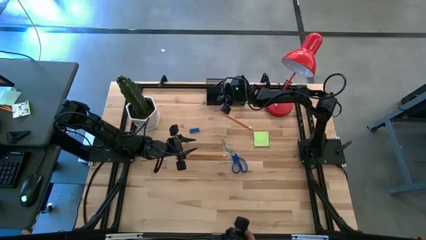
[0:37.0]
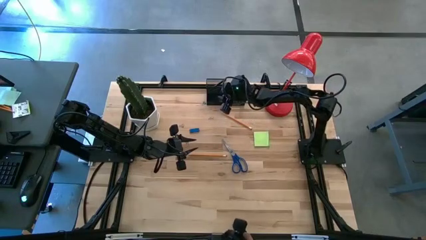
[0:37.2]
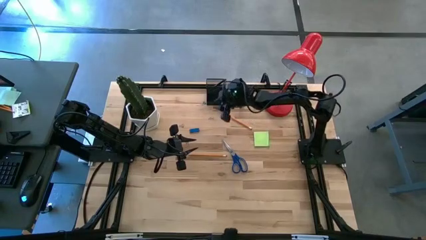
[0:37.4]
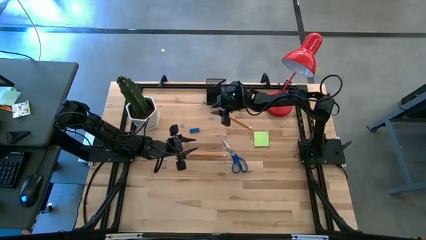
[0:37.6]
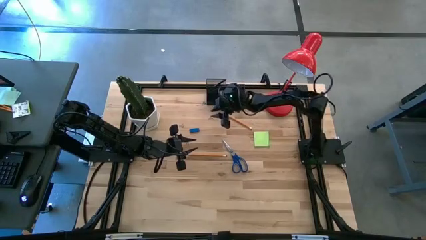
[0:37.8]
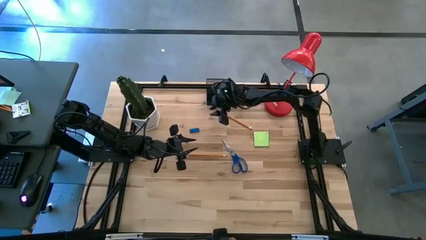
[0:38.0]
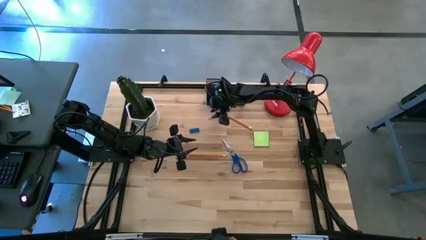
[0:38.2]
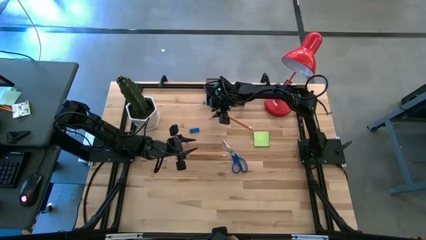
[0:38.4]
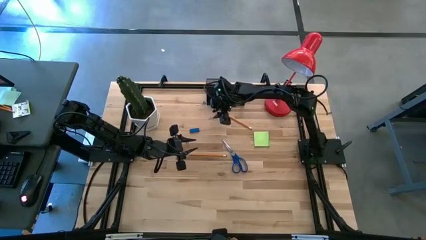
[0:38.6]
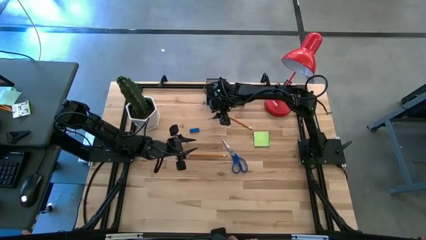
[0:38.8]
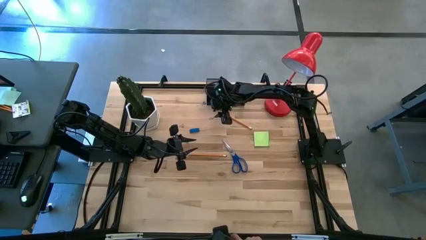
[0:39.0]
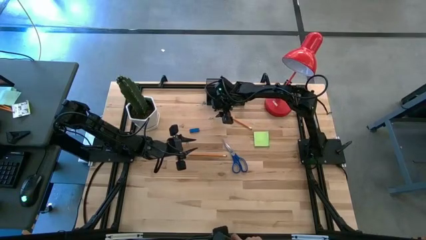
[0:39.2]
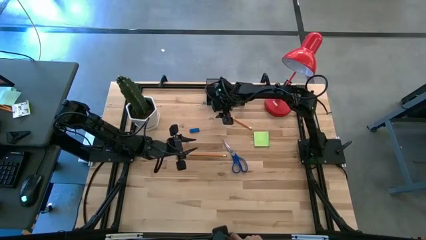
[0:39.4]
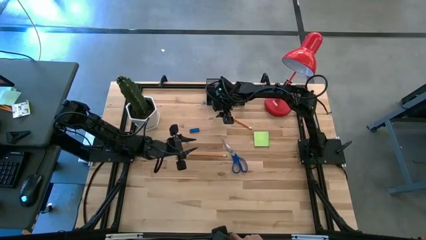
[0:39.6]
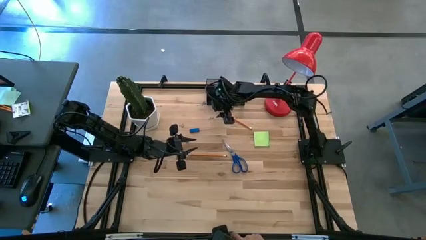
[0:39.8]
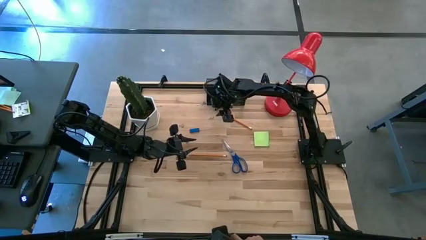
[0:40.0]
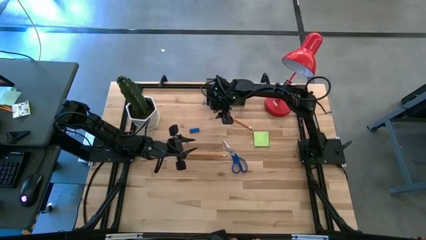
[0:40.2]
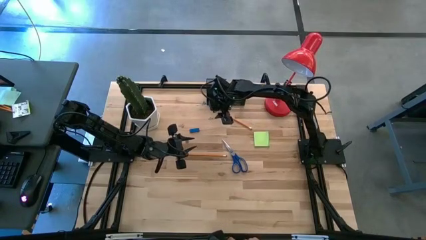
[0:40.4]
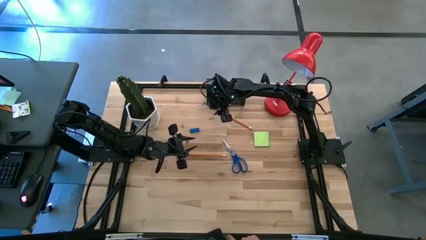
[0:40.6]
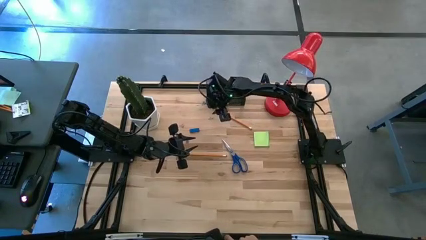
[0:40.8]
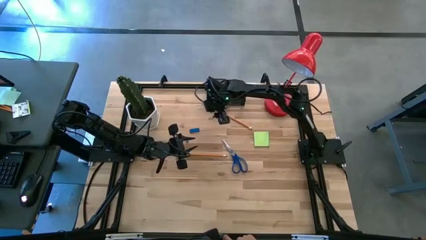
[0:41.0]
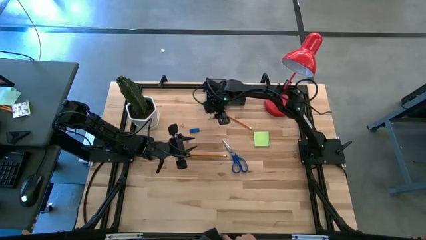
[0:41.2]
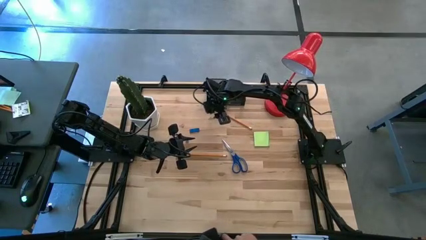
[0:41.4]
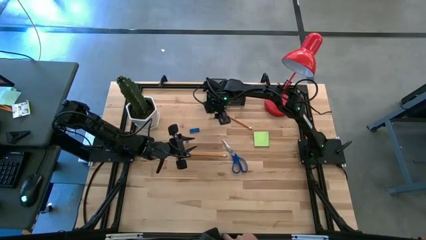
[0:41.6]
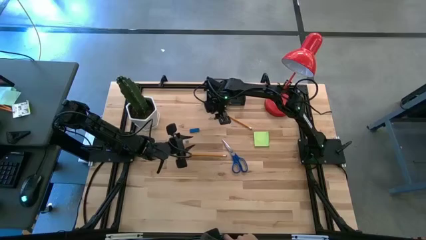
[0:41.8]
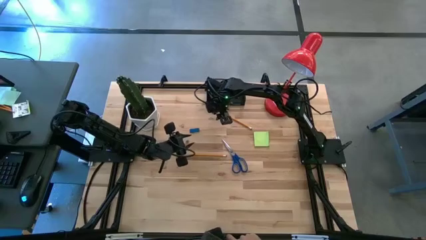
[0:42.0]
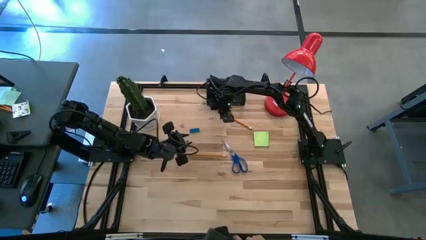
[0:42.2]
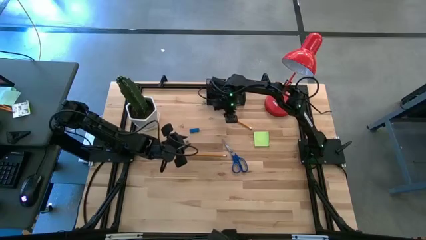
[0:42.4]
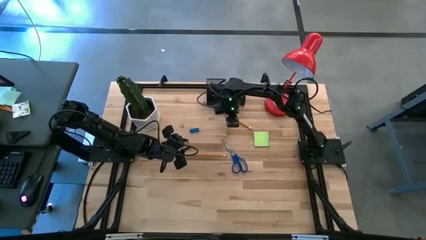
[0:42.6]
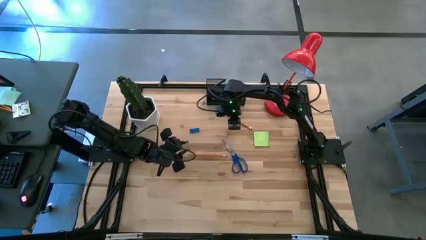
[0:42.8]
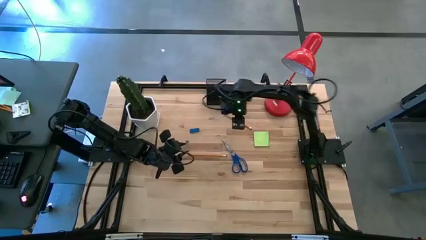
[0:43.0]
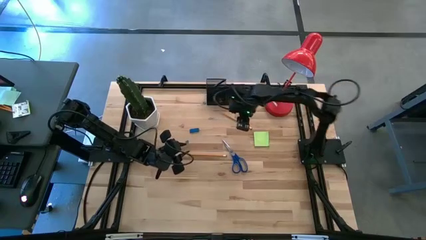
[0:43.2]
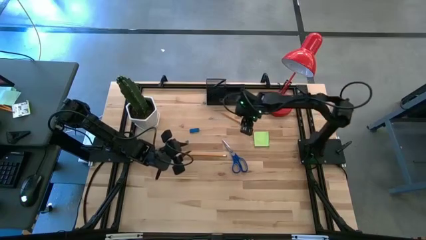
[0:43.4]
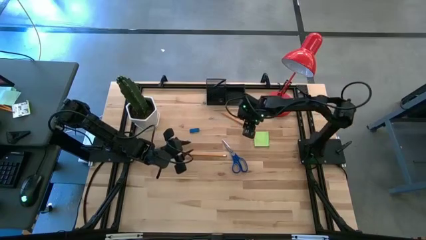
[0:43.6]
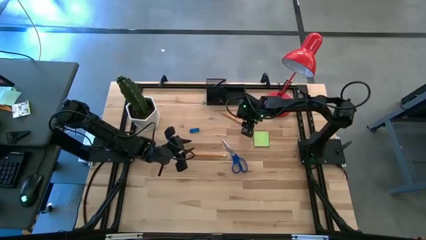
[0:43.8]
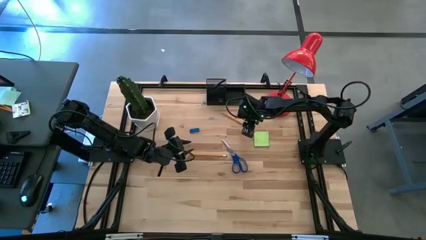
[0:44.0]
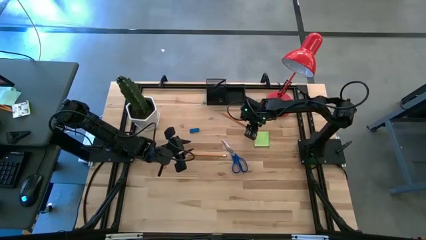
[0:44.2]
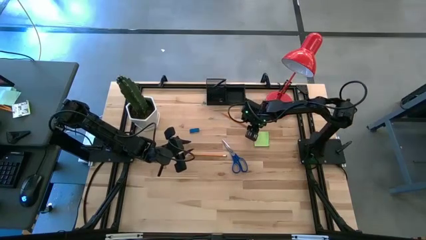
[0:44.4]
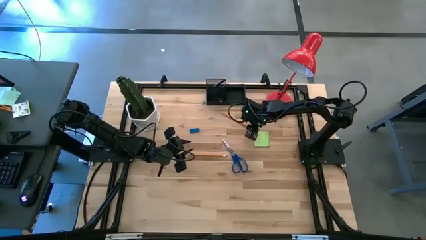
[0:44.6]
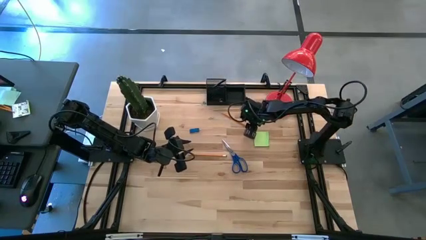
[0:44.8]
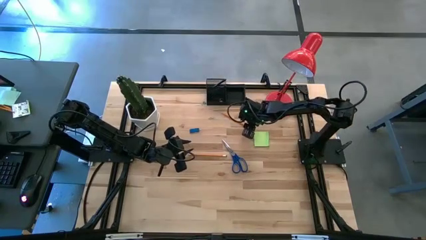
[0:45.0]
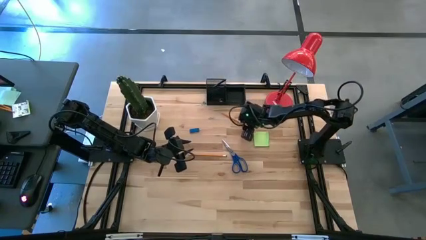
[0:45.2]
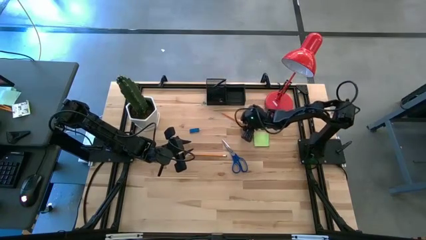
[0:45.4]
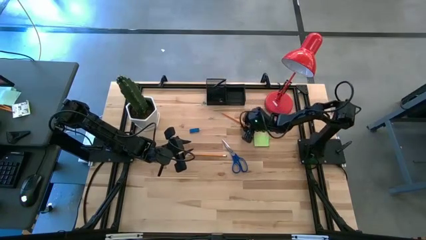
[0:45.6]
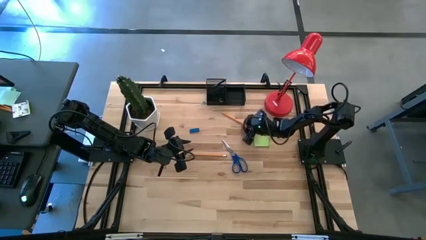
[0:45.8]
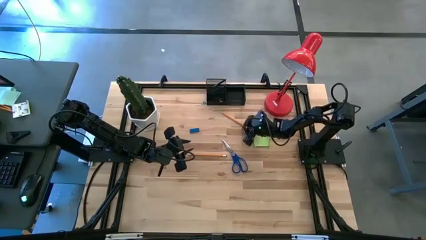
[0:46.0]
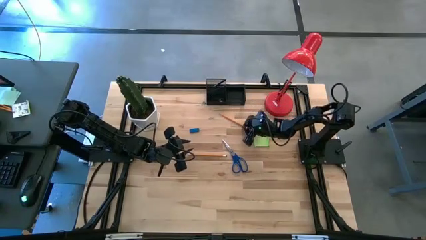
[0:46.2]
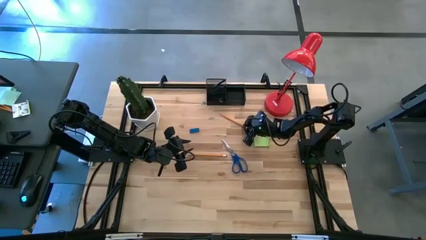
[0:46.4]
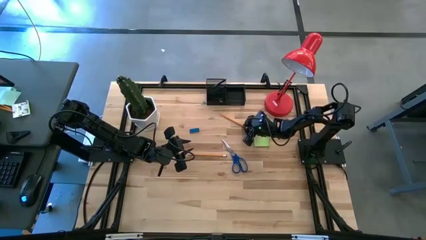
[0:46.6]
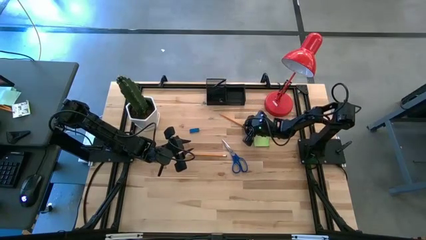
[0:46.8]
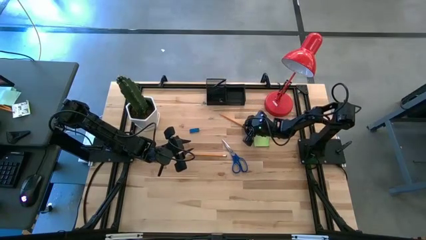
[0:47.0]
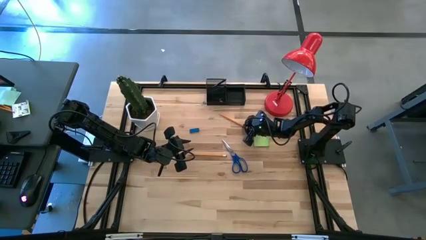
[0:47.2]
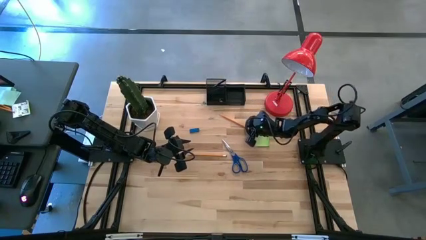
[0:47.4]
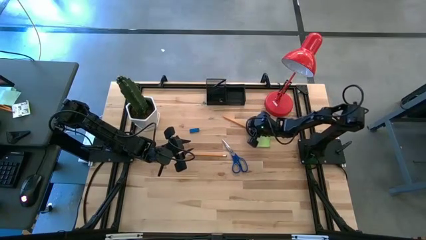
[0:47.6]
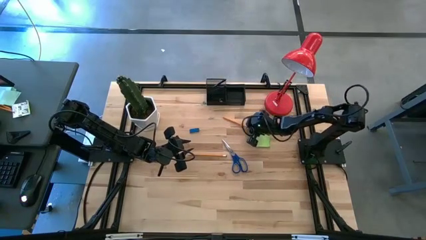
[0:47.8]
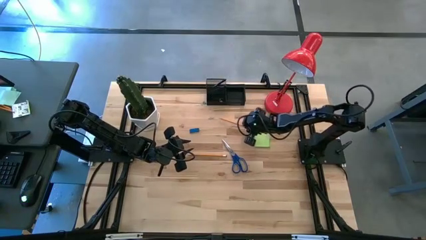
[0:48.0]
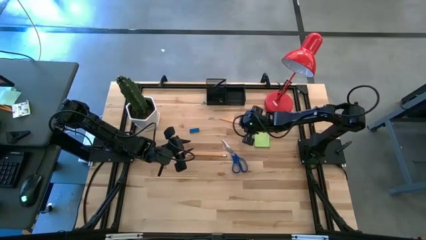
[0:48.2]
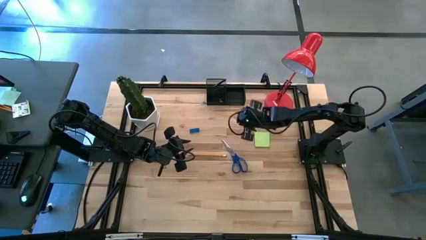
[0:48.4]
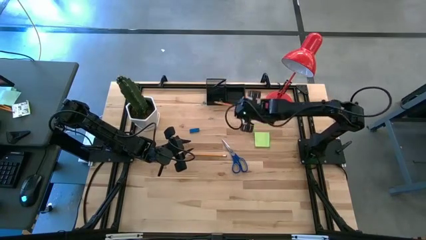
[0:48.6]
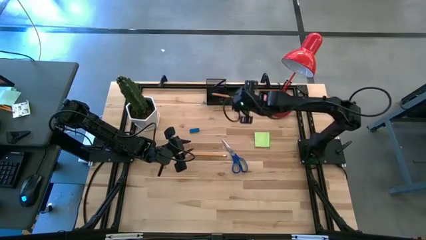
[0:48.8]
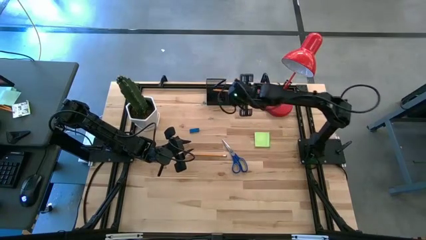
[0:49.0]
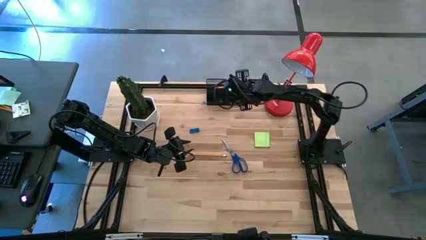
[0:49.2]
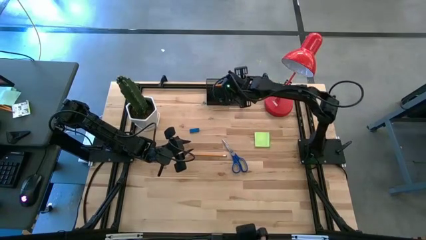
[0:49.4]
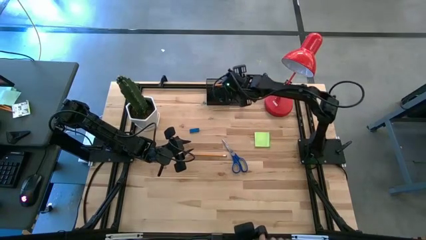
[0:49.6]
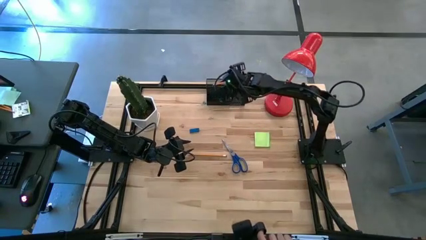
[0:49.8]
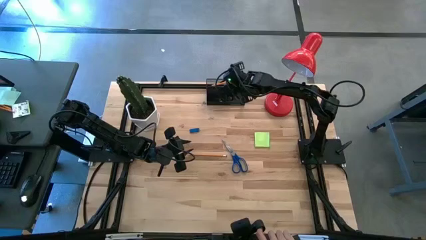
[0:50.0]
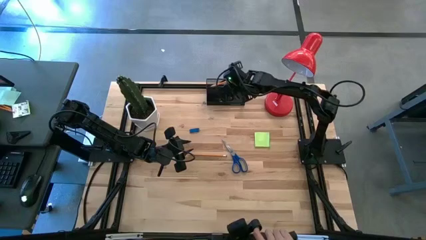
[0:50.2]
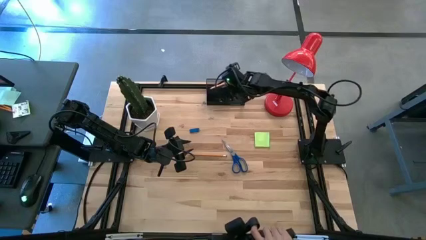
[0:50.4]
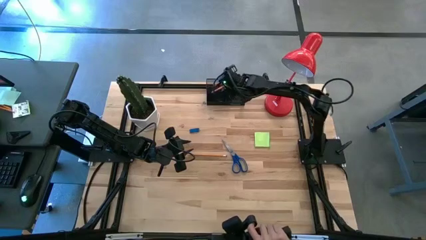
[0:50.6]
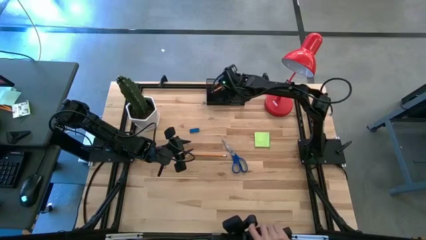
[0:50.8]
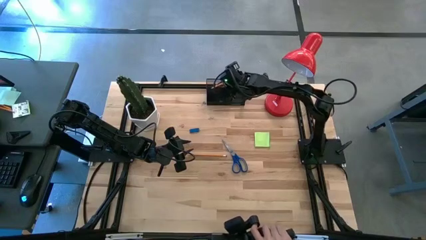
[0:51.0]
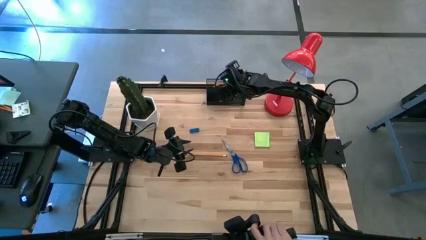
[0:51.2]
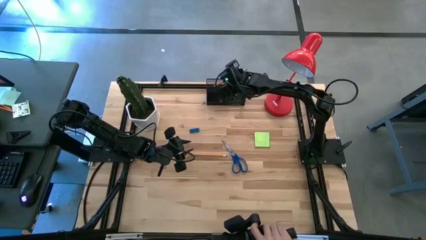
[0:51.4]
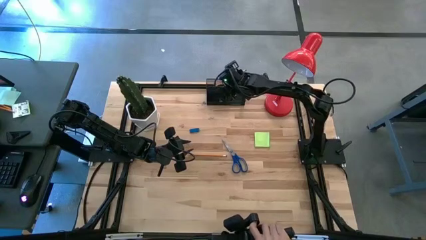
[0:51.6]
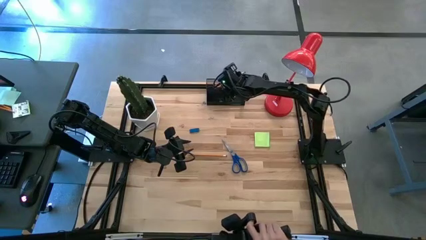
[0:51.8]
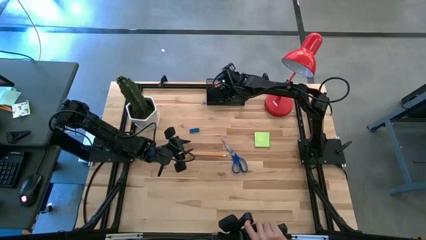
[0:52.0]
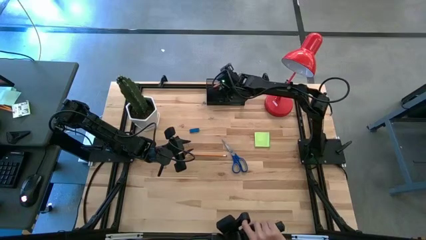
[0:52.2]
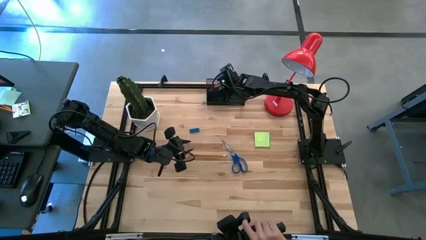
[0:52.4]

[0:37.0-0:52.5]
Task: Pick and place office supplies into organizer
Put the top yellow pencil into the top left section of the desk organizer
